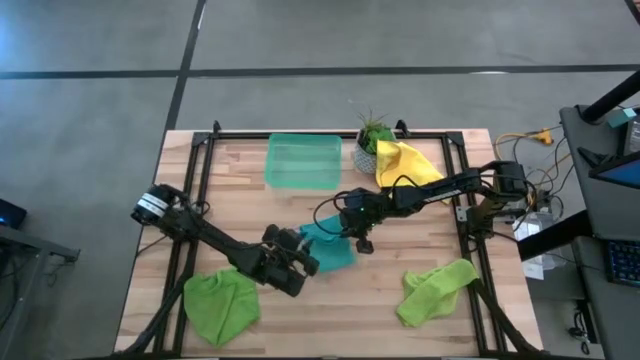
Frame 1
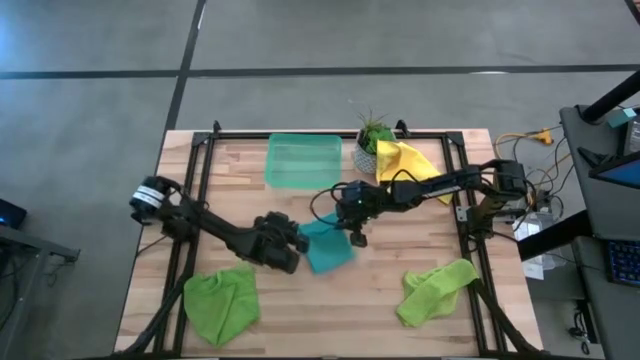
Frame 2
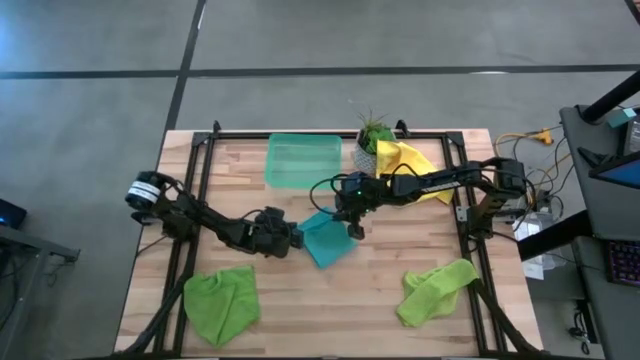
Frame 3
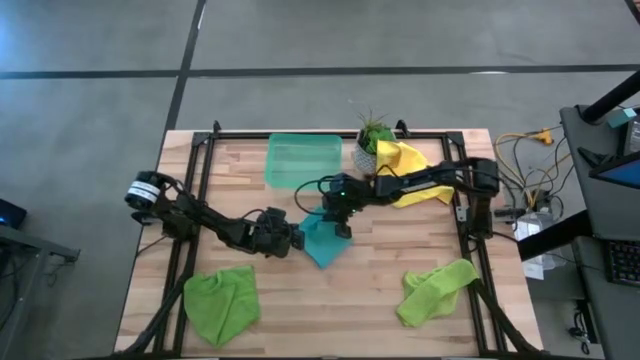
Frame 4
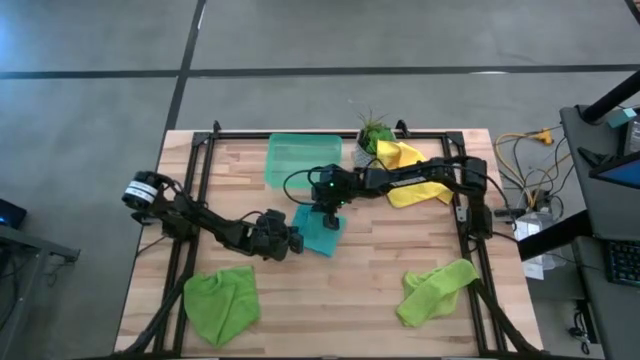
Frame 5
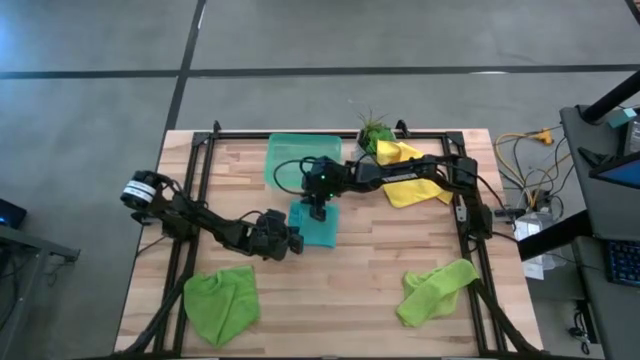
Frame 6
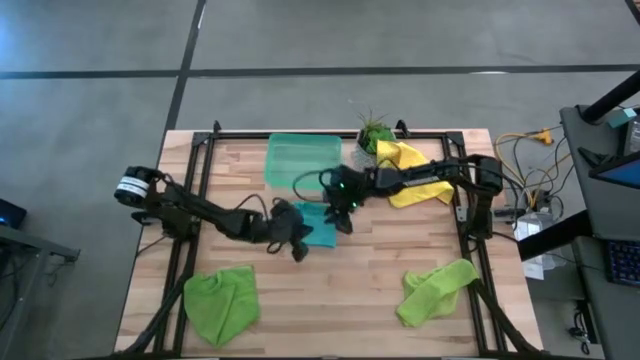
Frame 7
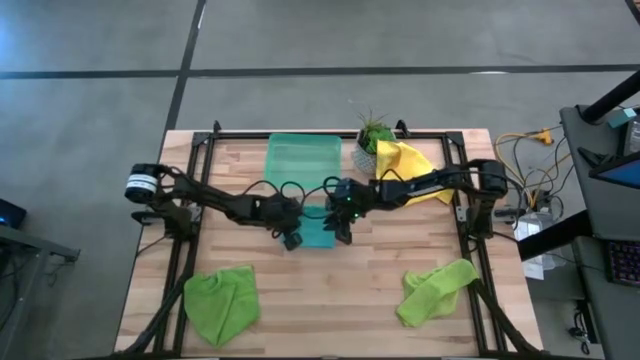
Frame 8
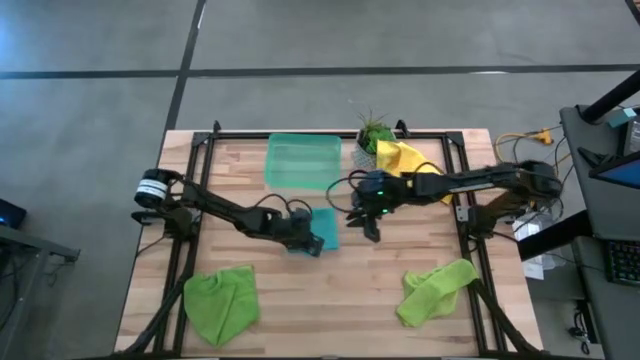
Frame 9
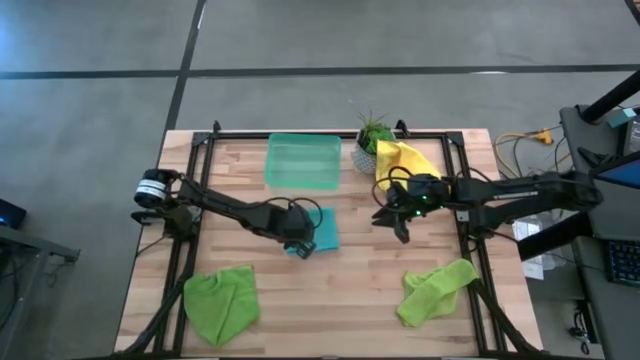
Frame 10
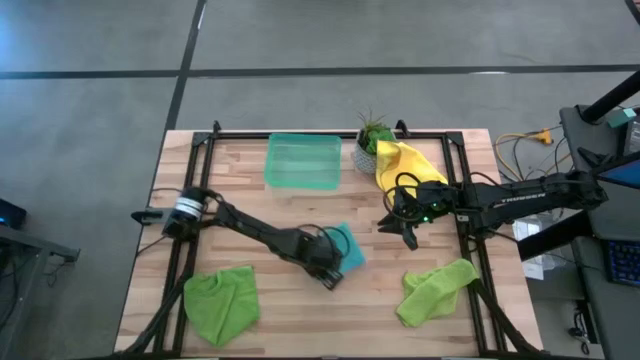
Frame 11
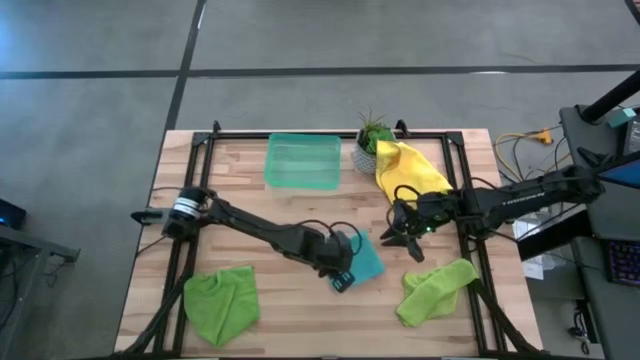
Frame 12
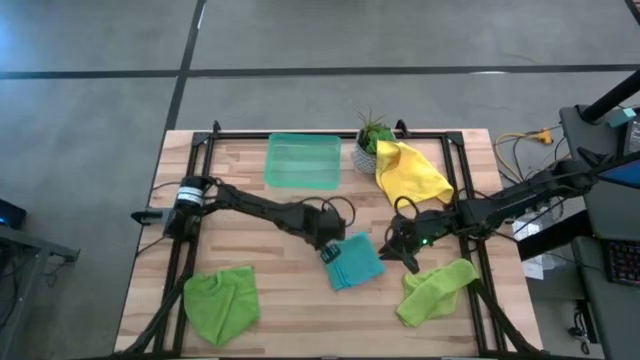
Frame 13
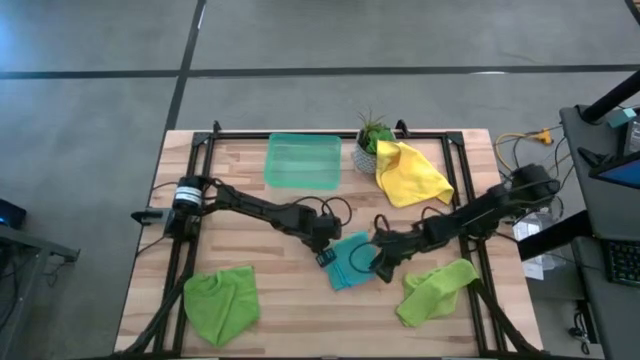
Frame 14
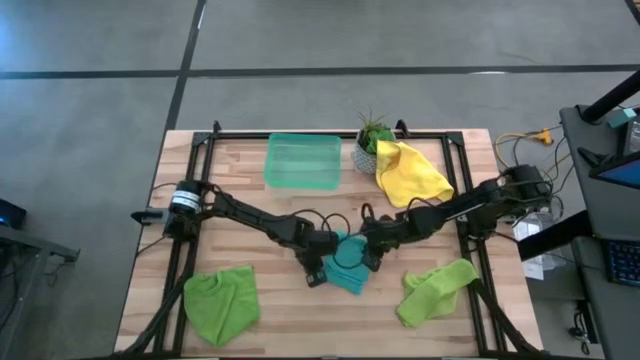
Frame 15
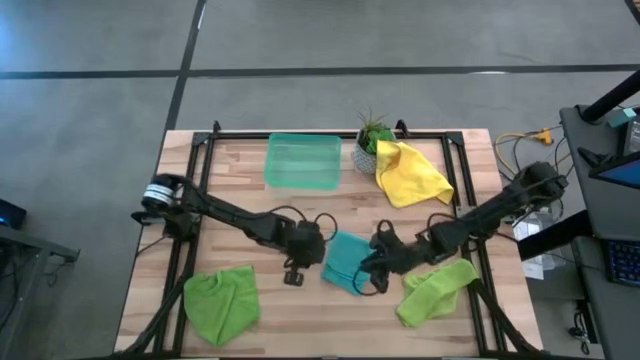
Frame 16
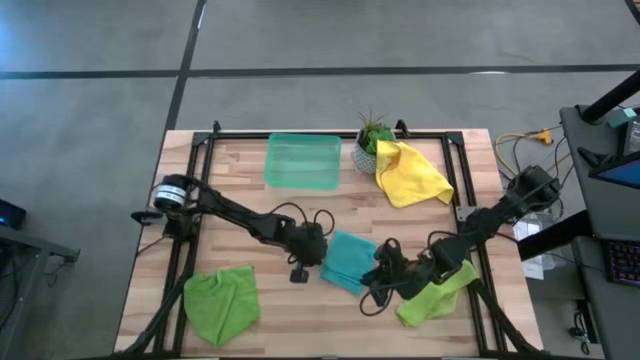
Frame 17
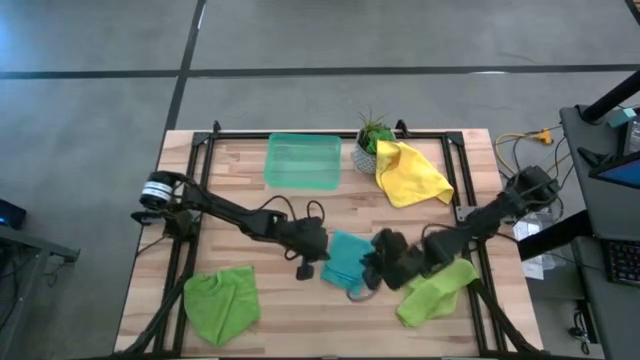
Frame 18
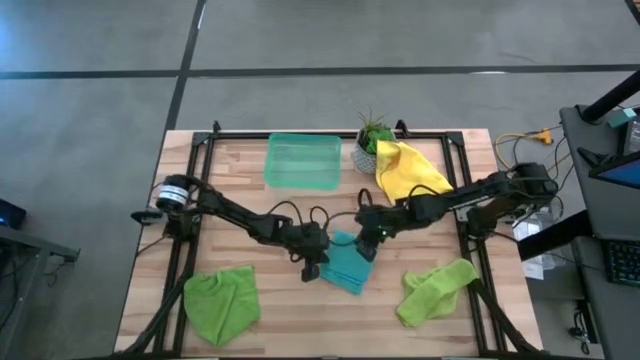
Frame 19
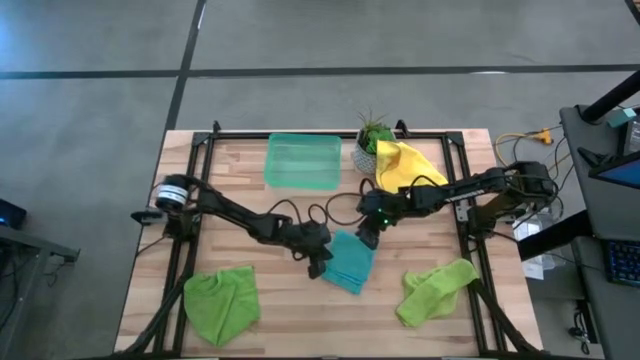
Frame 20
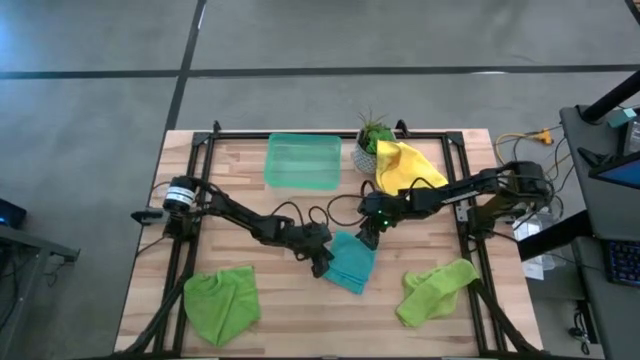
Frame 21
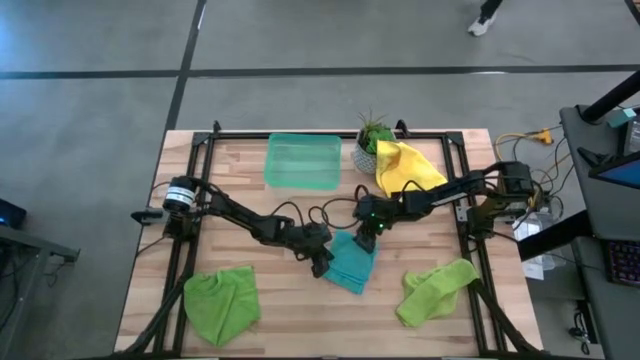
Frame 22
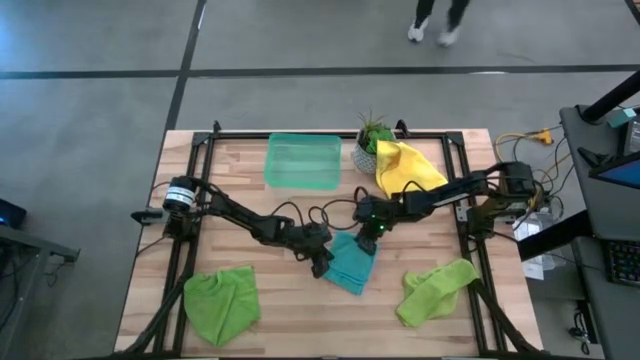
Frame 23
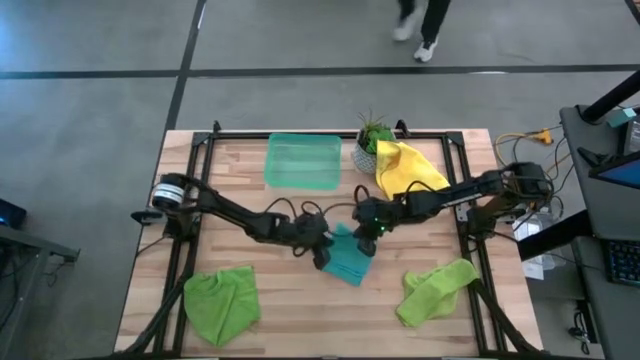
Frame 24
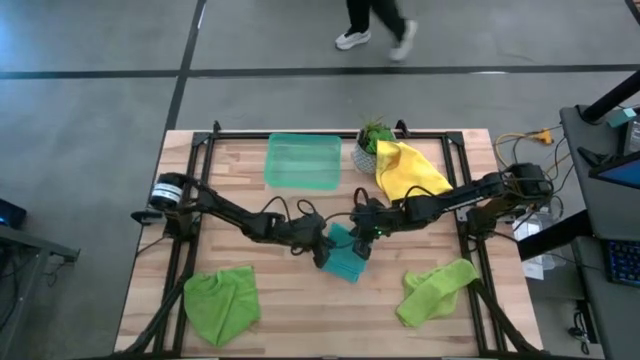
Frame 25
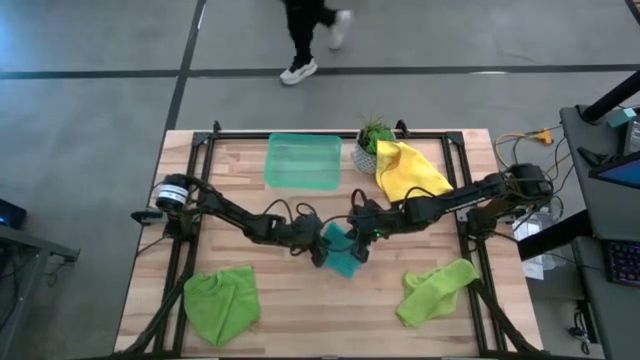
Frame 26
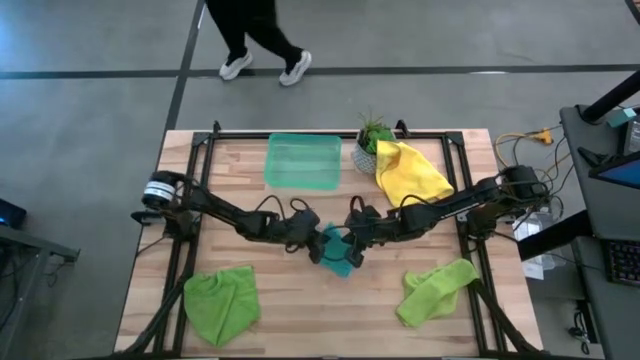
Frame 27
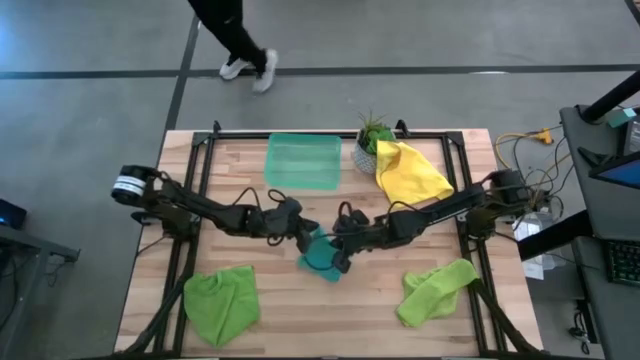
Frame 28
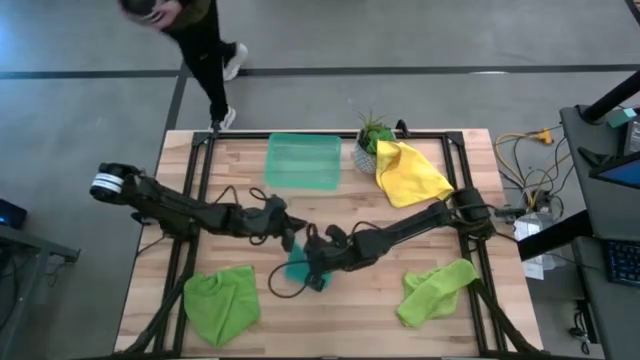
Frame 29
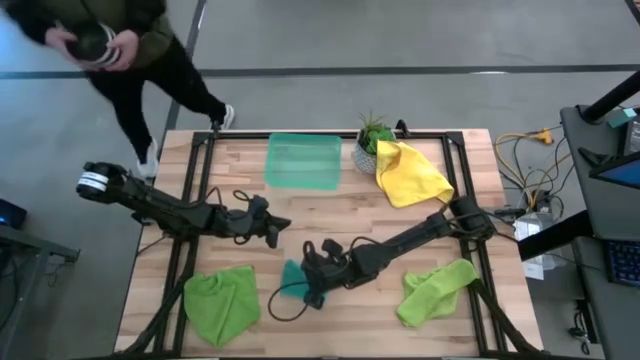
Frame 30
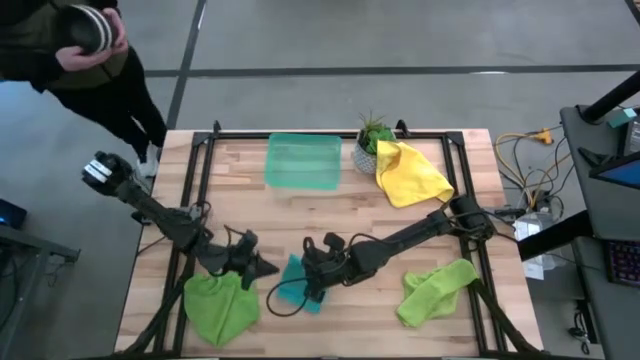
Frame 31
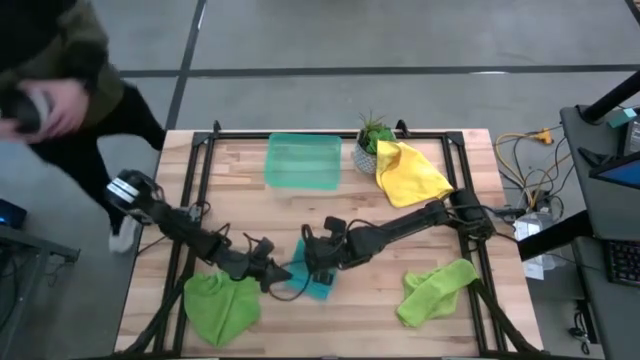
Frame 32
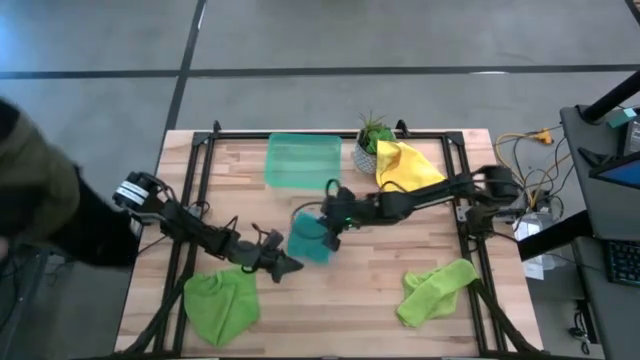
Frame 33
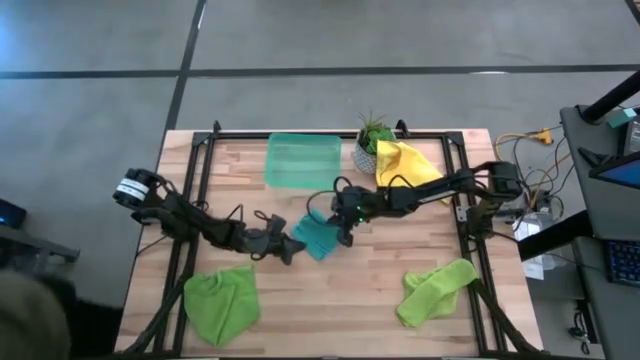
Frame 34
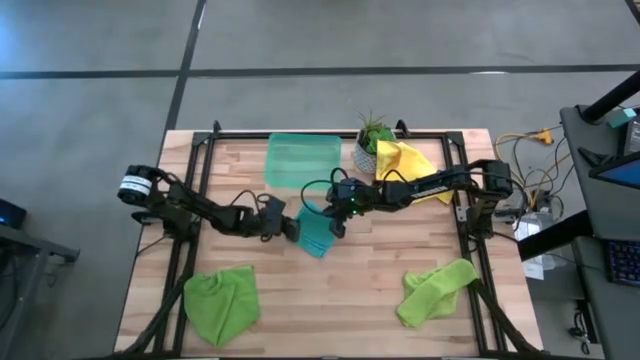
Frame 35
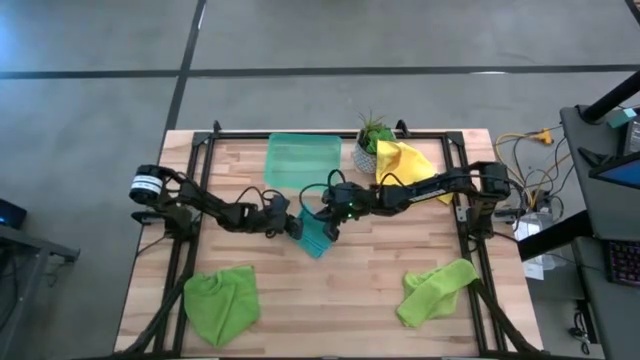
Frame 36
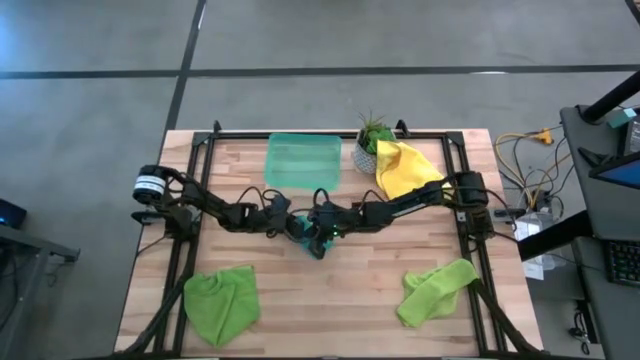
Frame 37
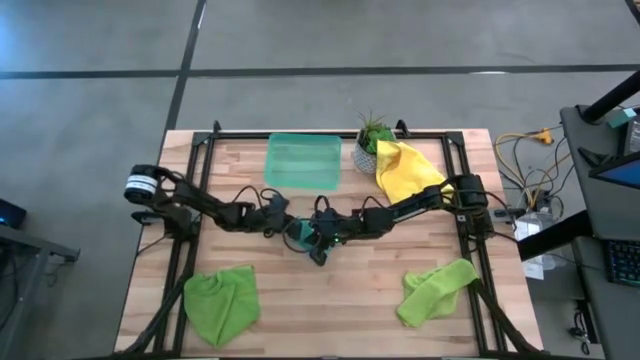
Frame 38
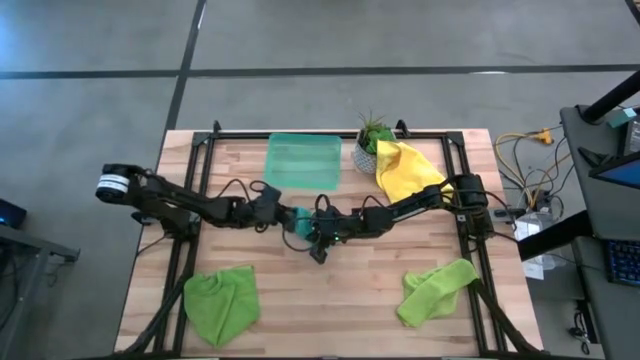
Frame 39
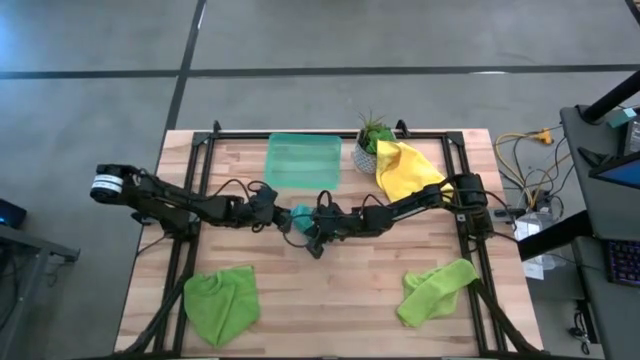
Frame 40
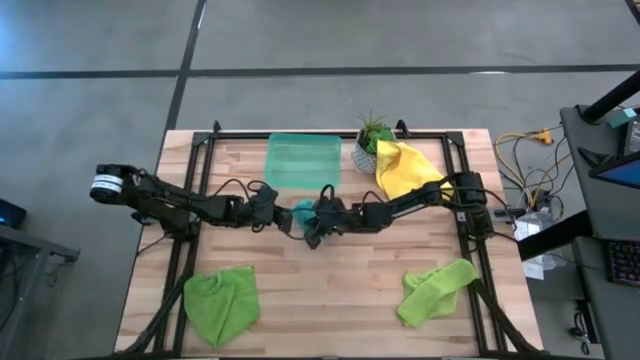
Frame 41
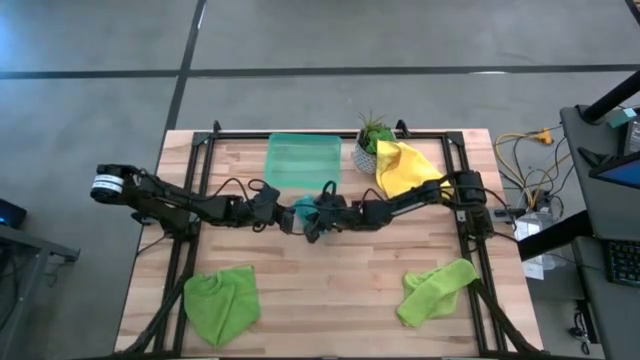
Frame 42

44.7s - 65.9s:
Task: Fold microfiber towels
Fold the blue microfiber towel
